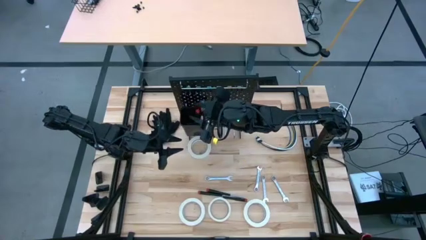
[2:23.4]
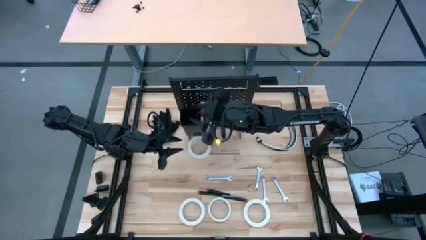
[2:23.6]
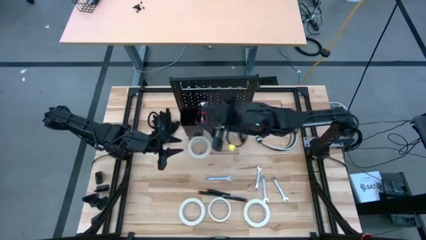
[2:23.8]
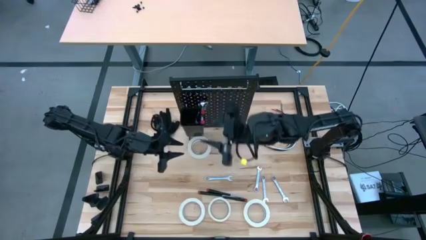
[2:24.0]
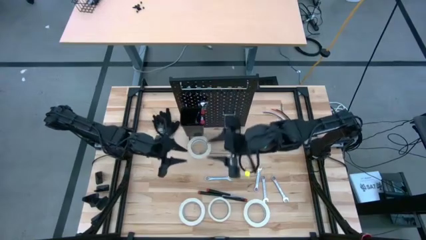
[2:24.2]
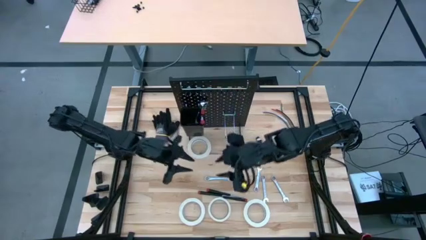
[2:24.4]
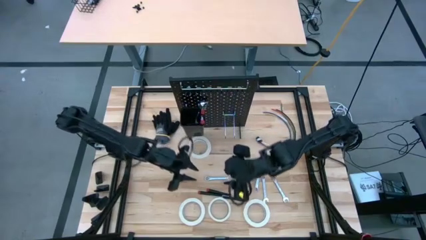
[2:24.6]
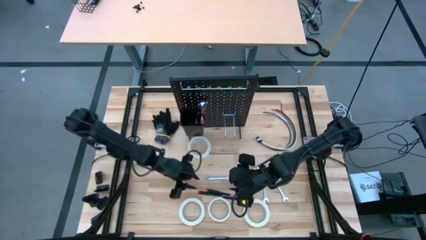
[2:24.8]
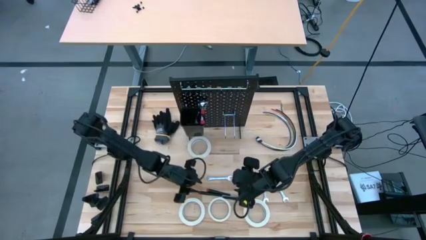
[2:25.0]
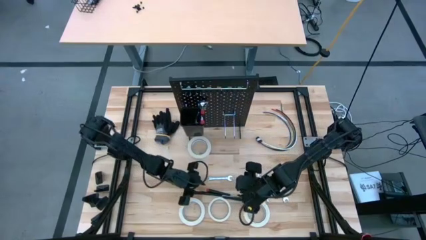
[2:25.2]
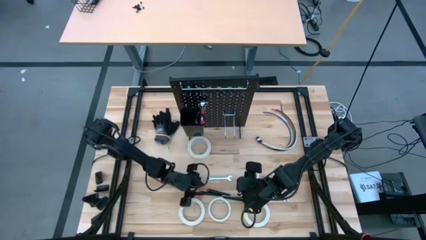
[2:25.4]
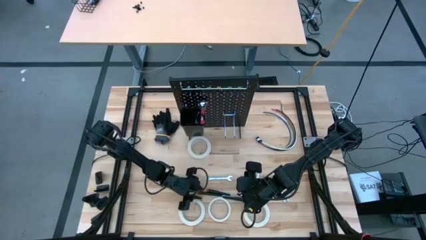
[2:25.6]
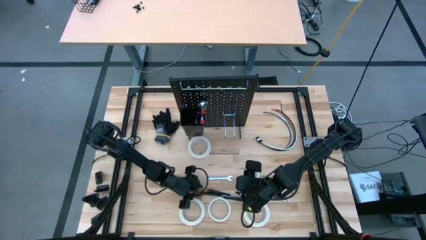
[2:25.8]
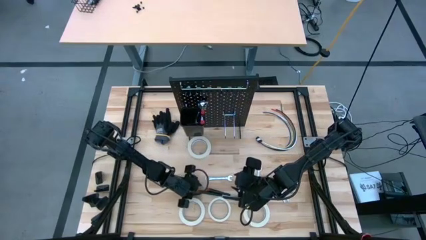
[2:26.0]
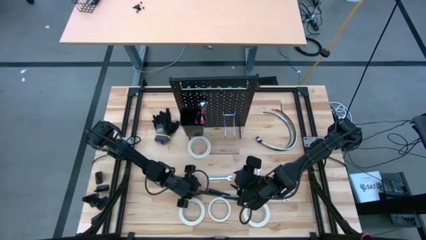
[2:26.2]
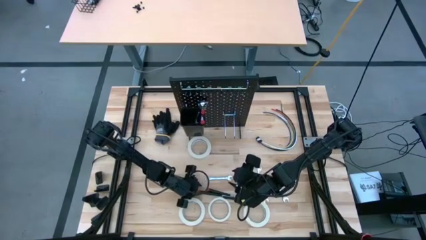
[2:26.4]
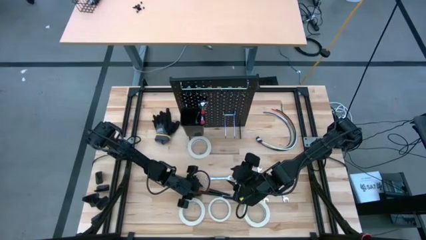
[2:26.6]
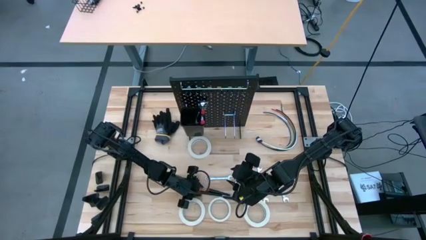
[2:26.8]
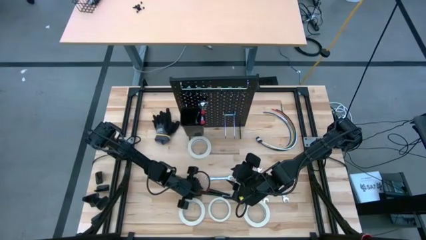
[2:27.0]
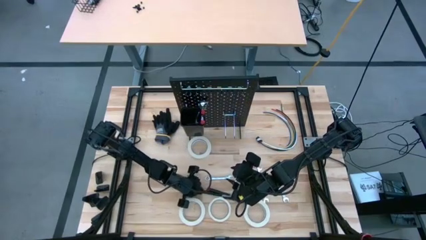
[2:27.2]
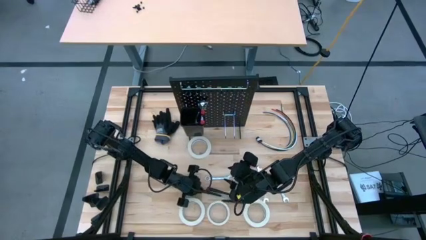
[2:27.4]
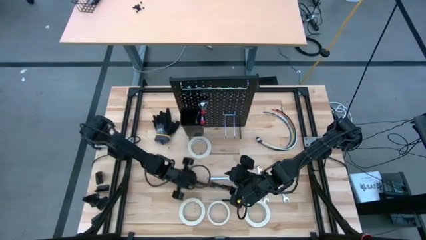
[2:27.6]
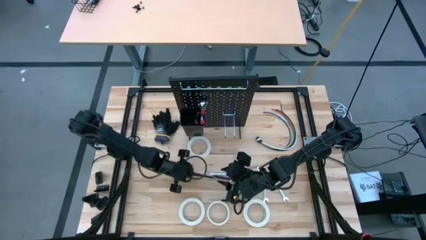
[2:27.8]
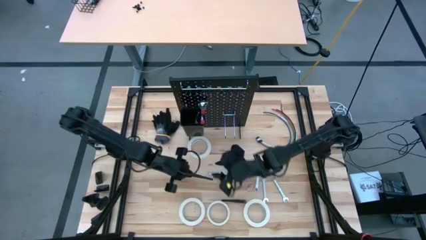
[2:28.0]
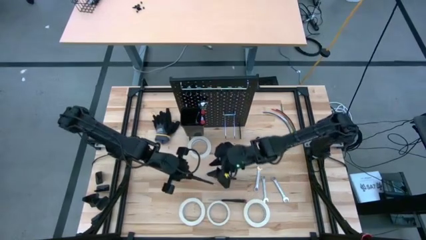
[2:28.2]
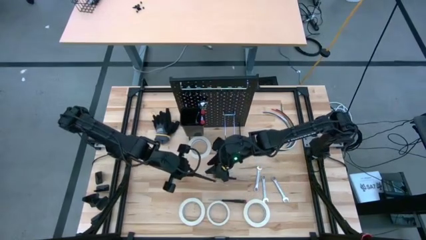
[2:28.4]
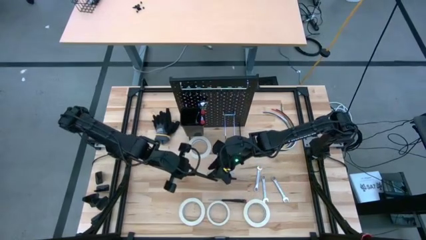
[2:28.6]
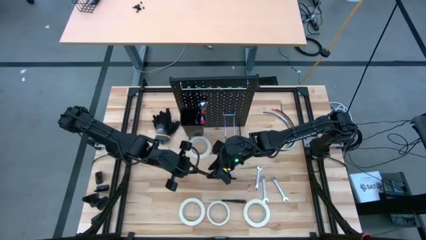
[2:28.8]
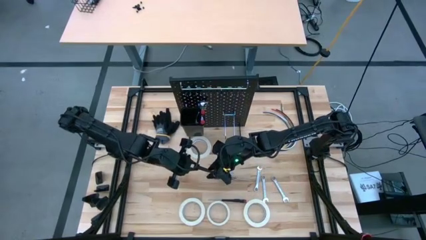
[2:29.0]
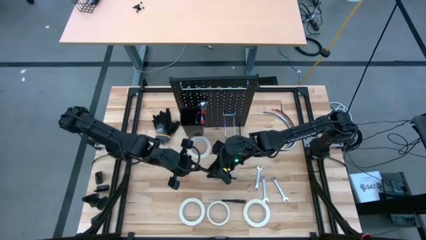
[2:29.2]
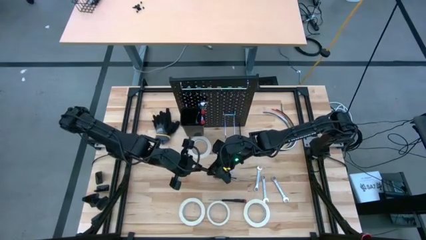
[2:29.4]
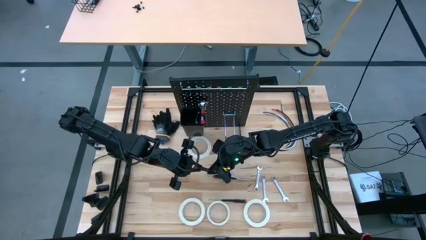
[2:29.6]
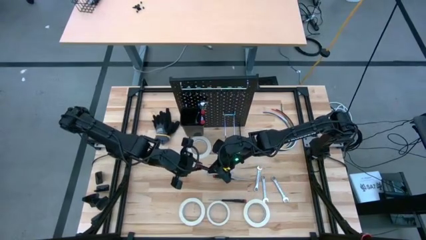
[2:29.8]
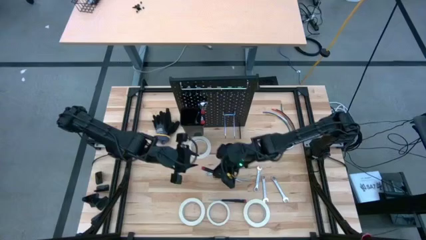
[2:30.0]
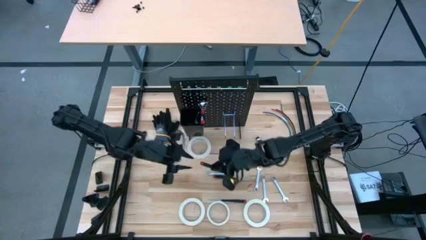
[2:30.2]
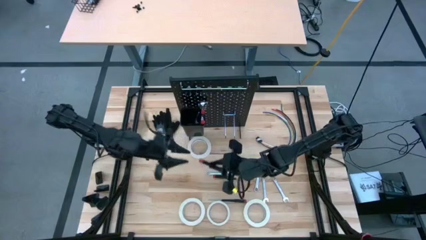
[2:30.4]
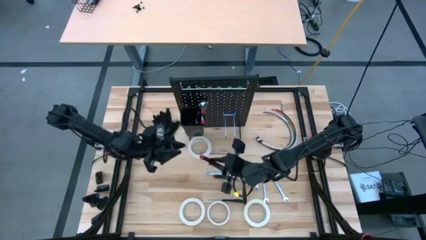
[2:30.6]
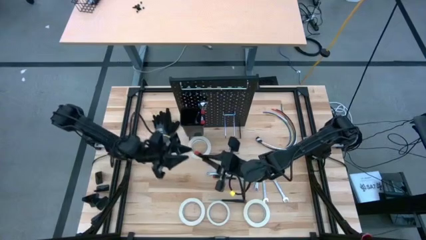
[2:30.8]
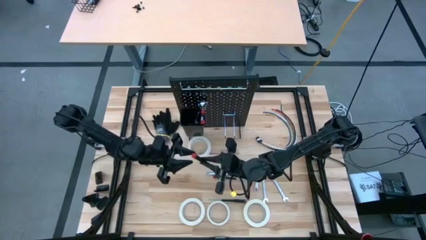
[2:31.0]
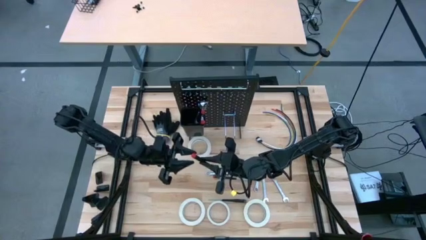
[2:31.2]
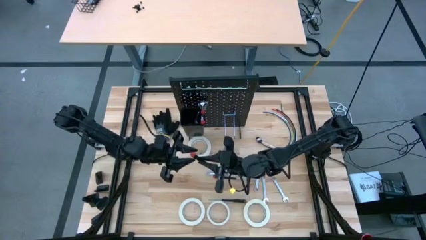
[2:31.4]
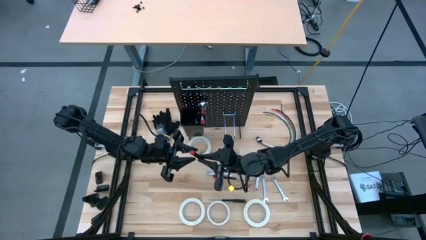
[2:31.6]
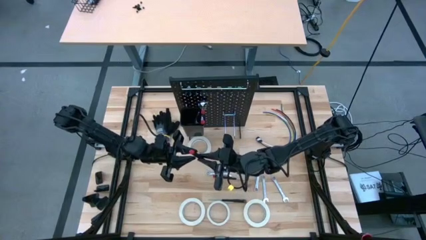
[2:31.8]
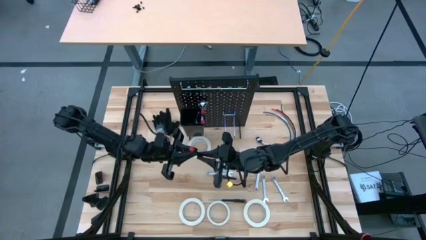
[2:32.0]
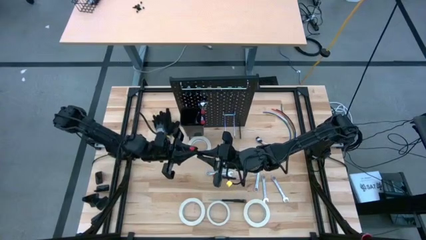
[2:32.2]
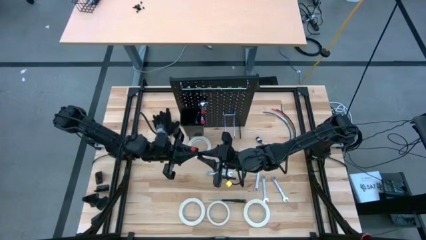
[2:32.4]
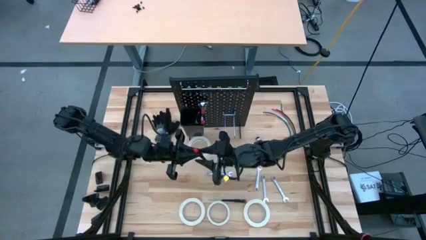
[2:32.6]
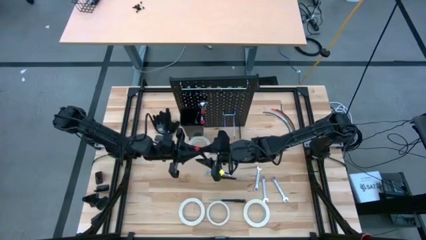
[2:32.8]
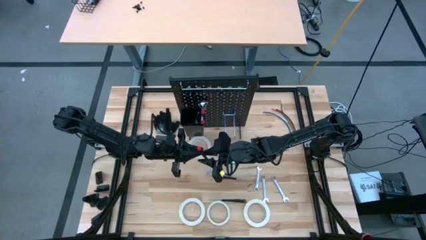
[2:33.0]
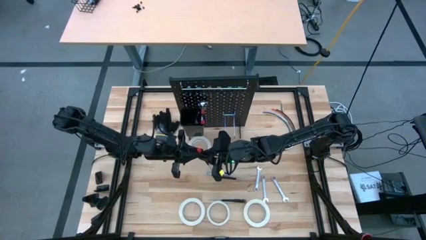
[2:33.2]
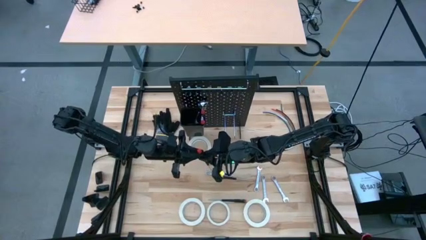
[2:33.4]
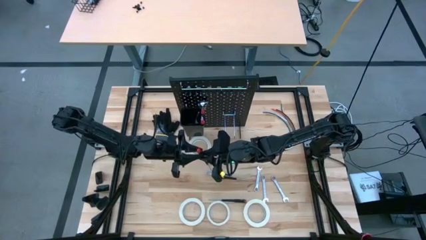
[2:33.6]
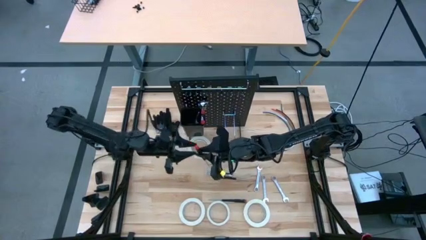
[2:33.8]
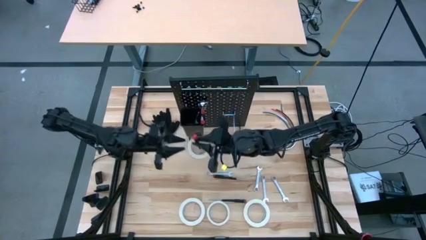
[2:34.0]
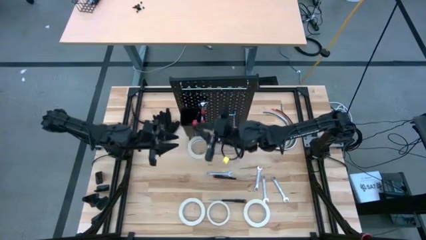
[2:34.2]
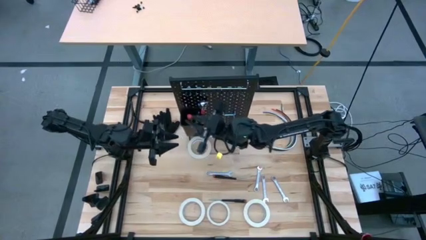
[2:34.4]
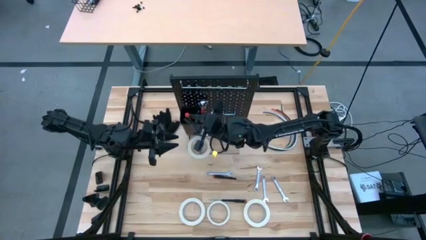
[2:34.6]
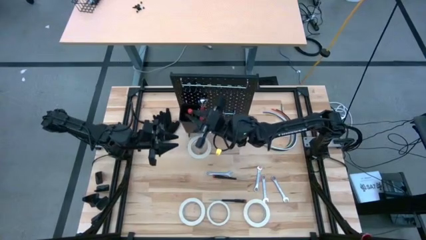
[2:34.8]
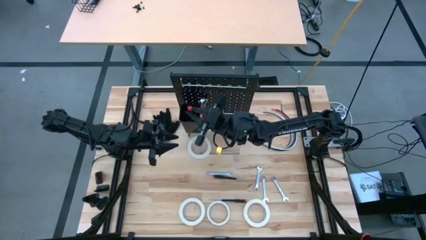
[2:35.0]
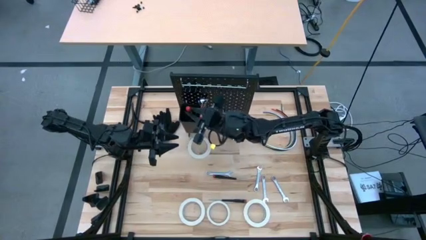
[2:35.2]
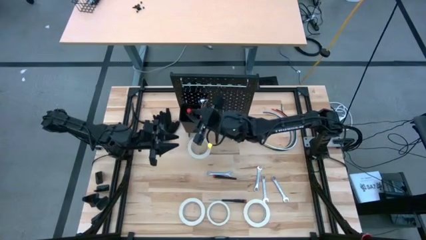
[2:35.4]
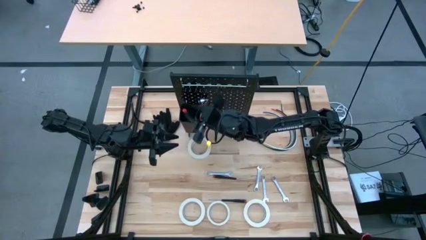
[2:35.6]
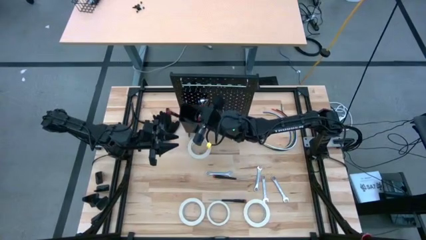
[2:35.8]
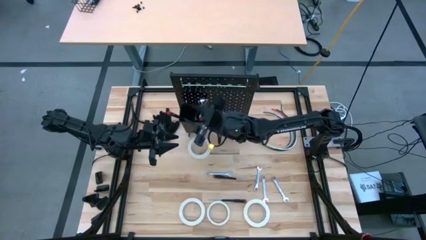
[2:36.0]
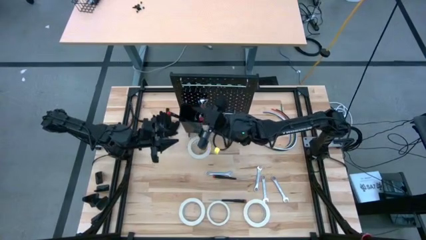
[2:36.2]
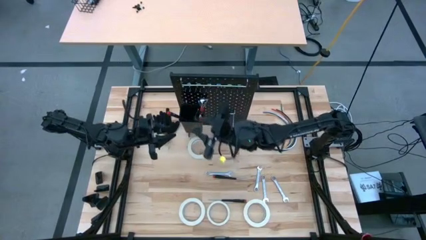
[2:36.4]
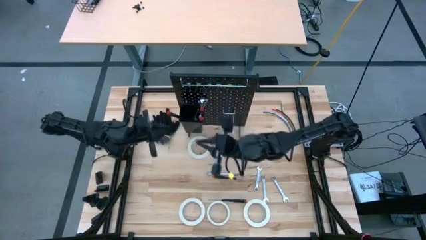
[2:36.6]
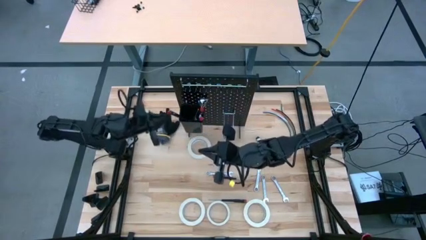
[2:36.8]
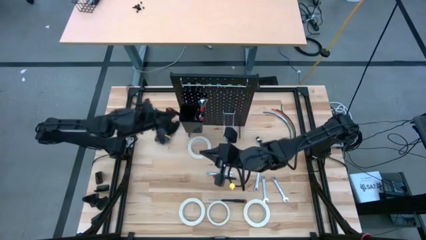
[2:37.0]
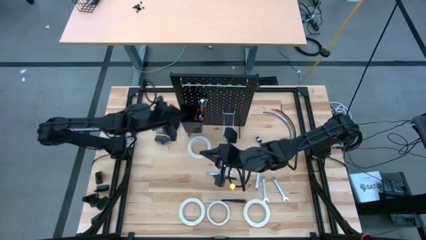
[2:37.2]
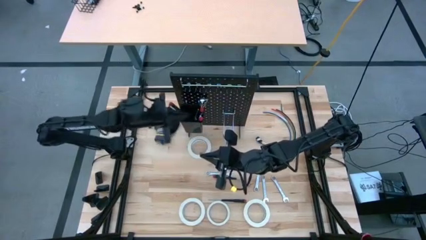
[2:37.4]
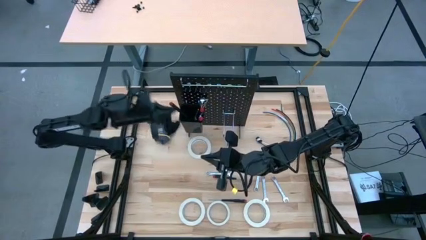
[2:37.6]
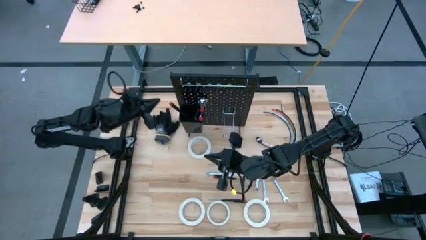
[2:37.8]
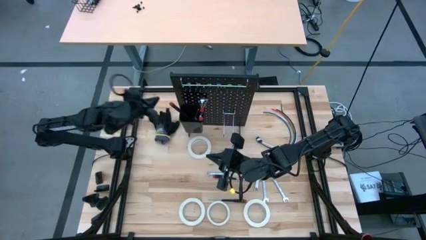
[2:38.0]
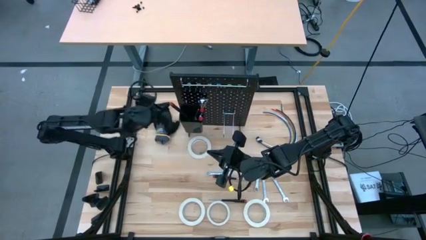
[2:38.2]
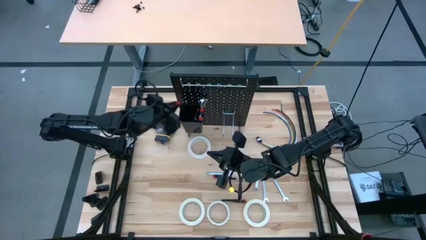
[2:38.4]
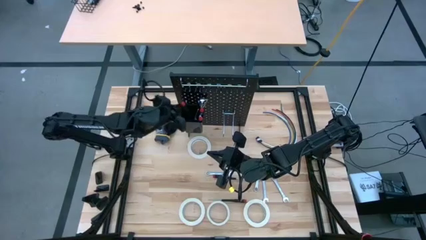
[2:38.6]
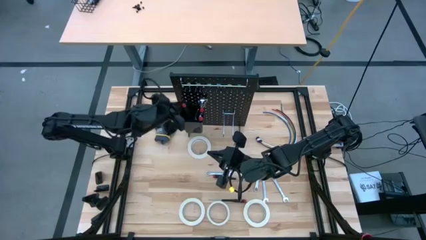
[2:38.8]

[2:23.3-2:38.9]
Task: Hang tools onto peg board
Put the black nut driver into the black bin on the peg board
